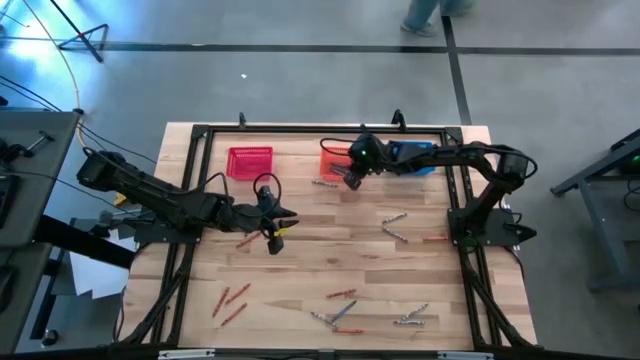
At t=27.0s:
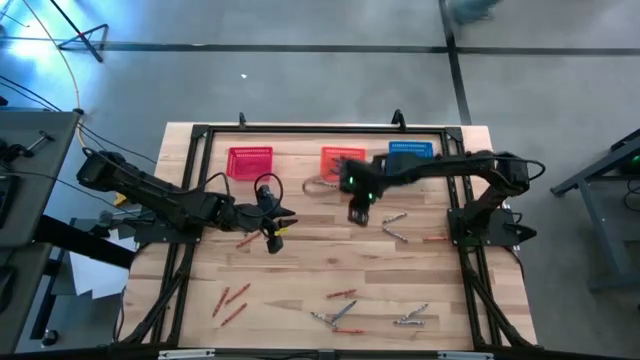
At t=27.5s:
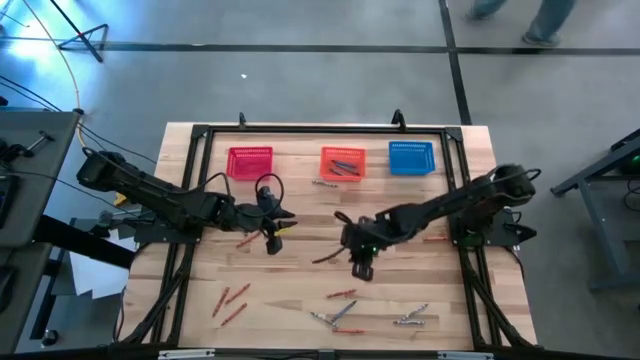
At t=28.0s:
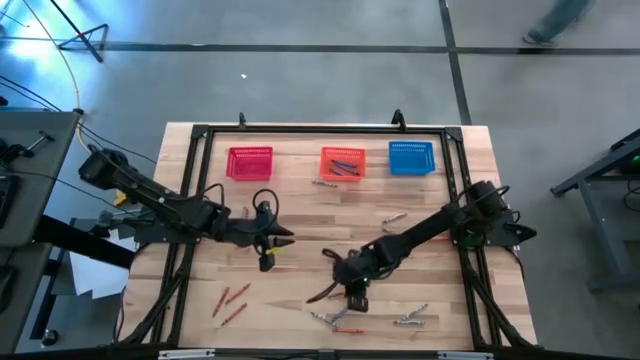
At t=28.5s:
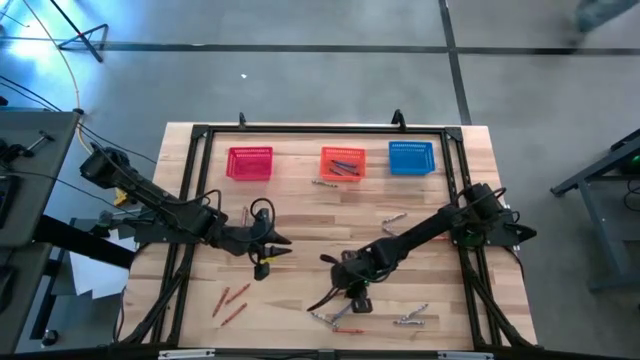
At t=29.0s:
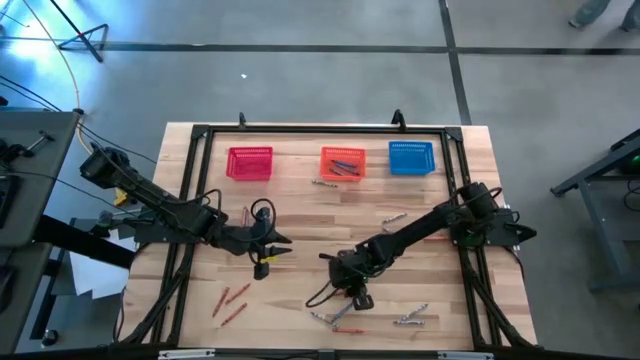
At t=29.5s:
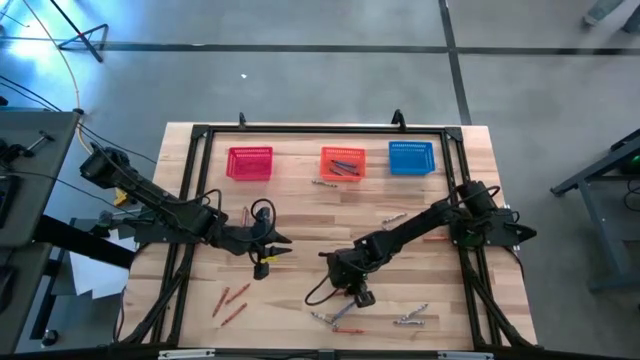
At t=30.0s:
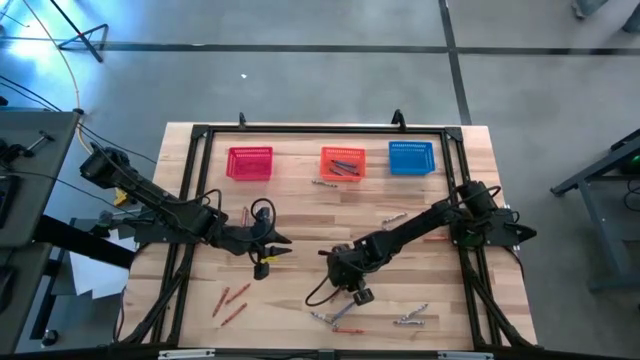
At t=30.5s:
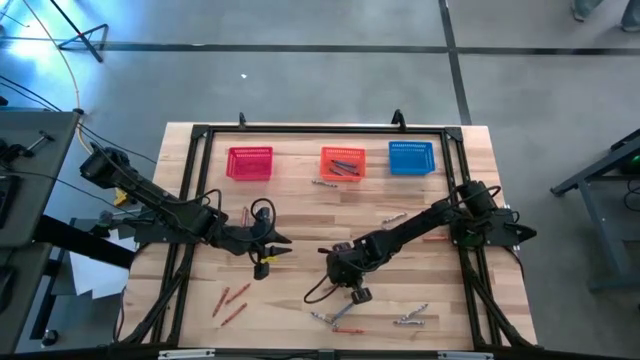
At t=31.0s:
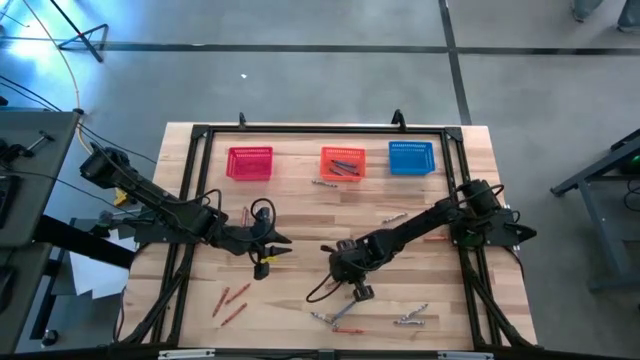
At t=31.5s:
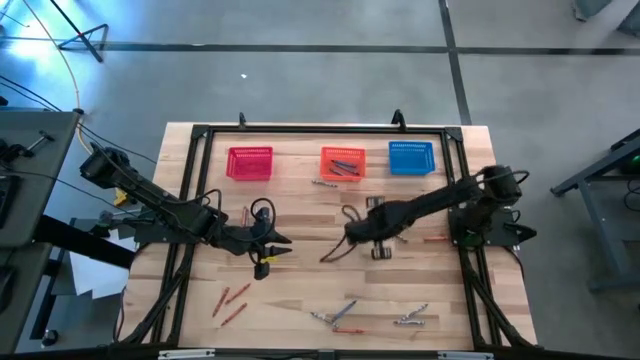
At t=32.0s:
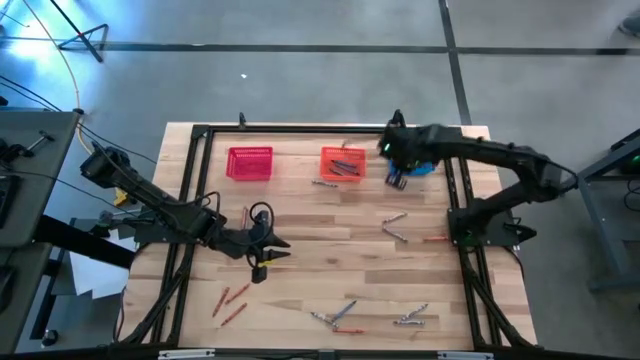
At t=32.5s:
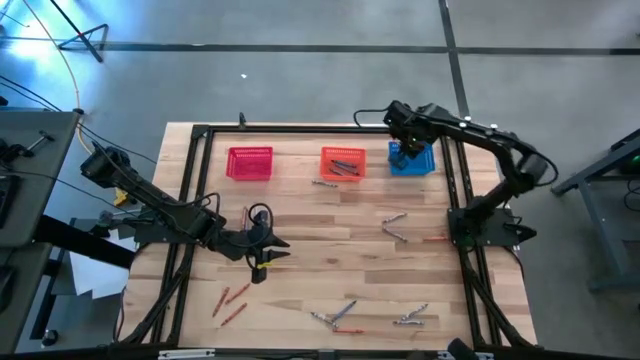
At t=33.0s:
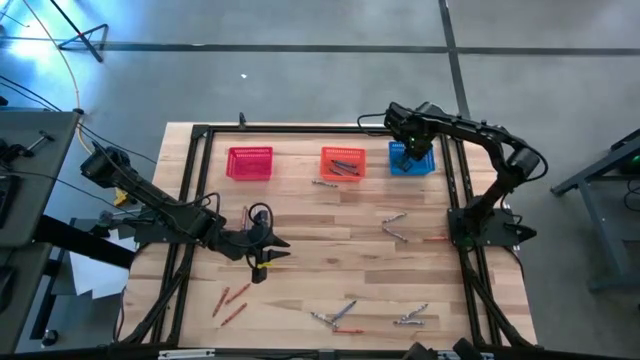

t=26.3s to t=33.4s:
Task: Sort crayons
Put the orange crayon into the blue bin

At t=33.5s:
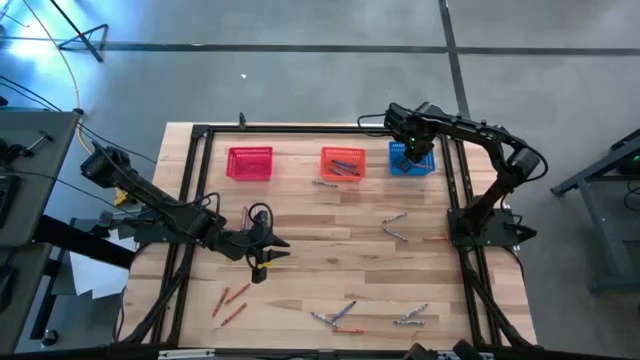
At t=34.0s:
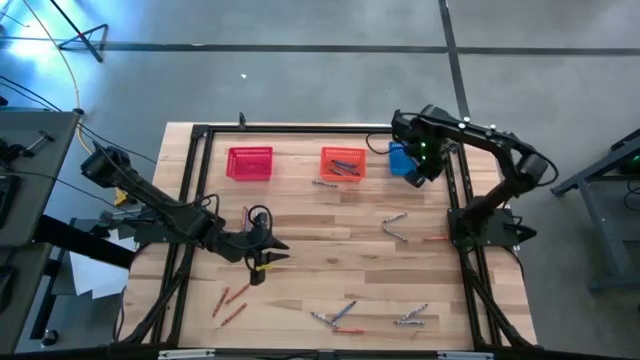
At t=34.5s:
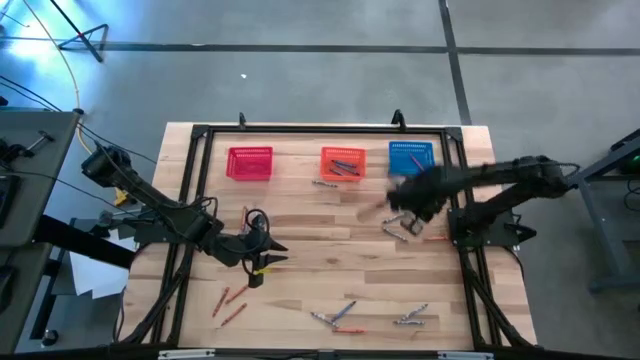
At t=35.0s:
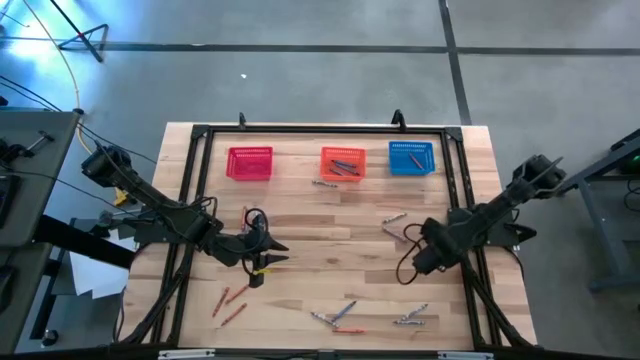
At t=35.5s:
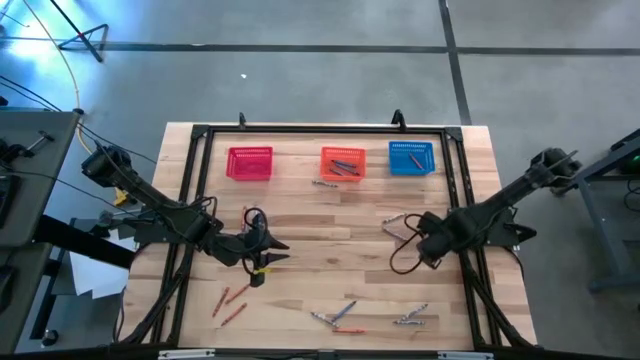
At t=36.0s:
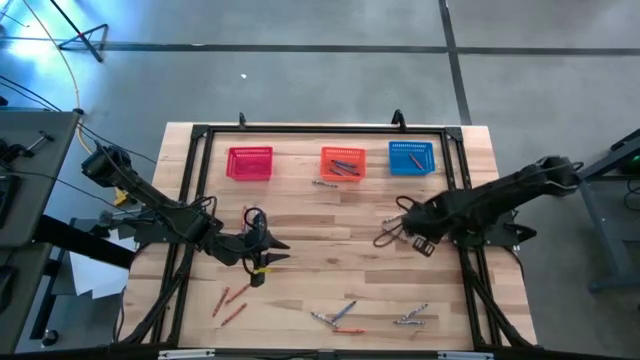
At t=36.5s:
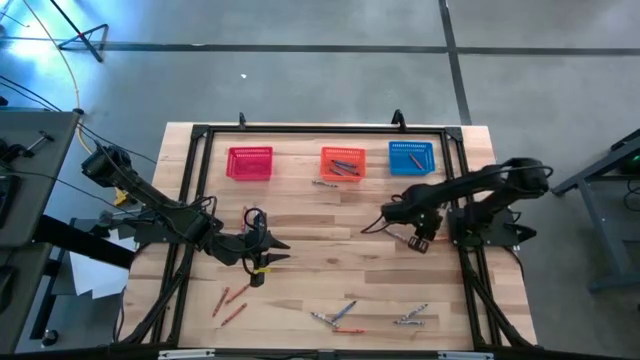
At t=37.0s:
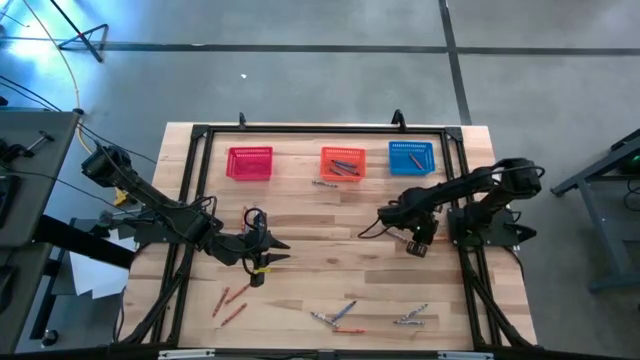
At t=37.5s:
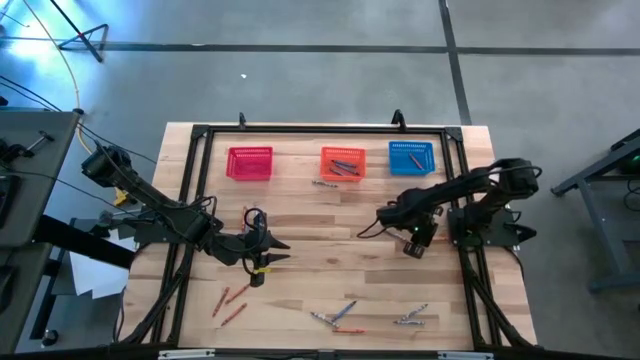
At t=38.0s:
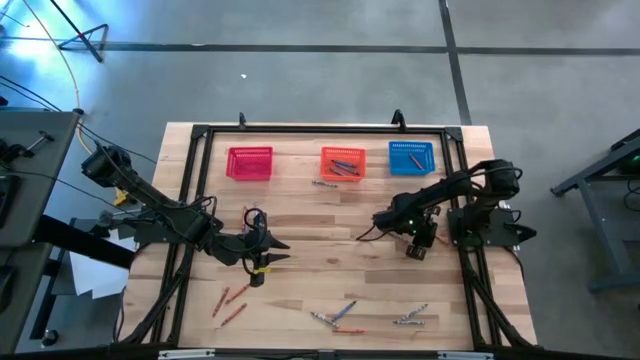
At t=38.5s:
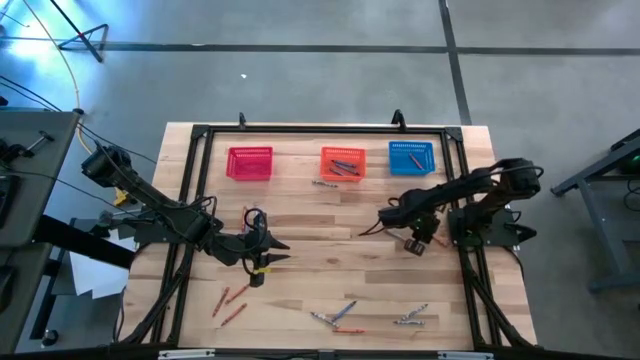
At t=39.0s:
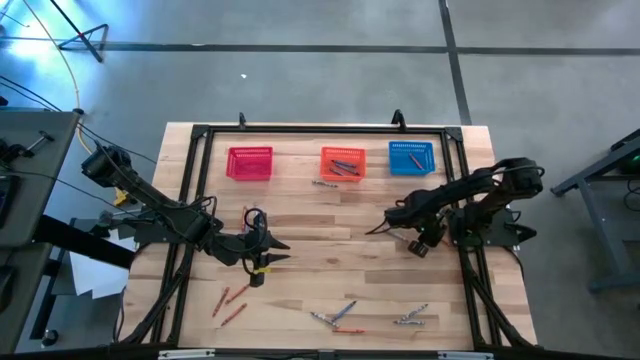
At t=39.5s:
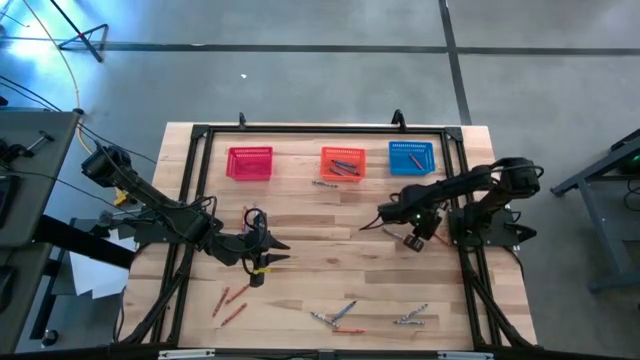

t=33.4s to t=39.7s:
Put the orange crayon into the blue bin

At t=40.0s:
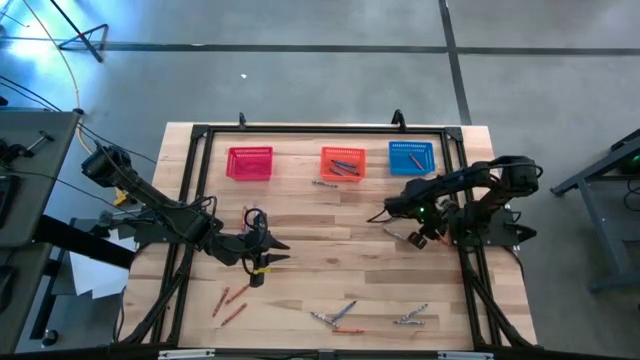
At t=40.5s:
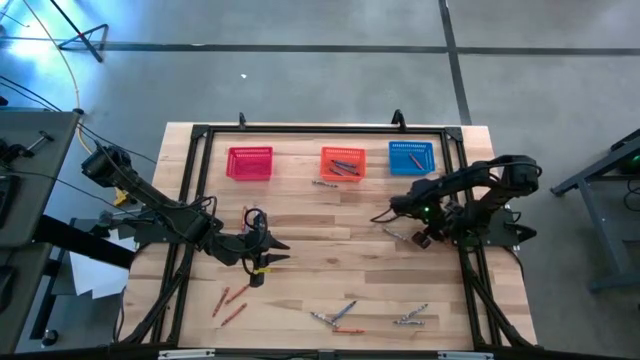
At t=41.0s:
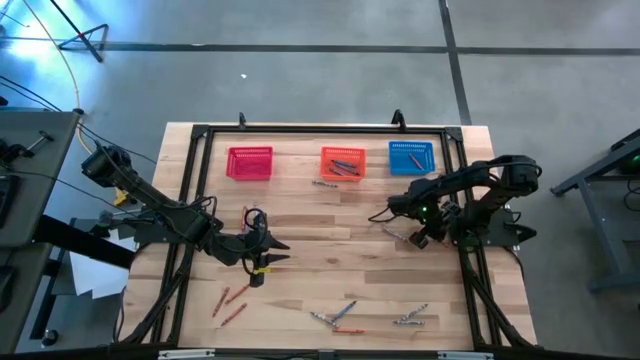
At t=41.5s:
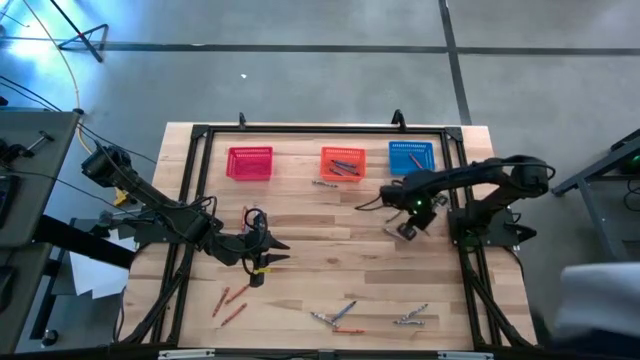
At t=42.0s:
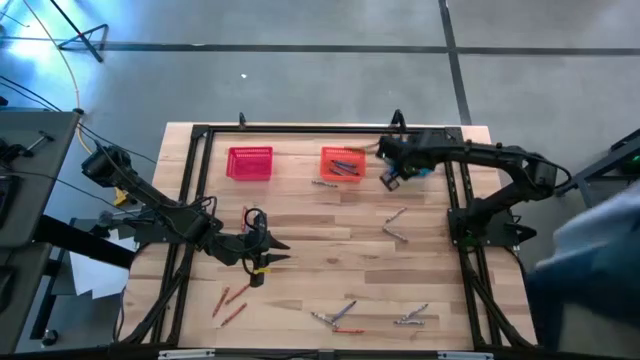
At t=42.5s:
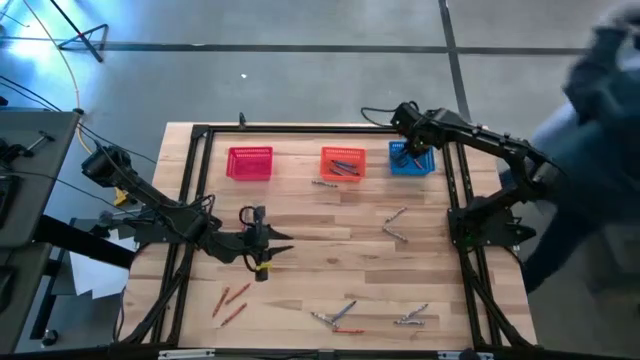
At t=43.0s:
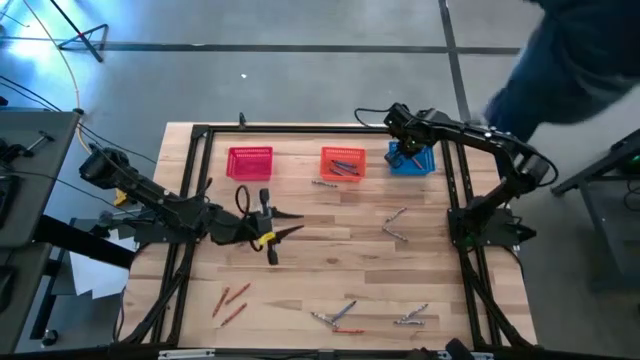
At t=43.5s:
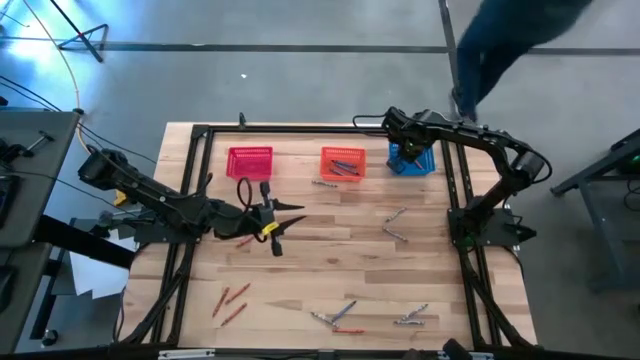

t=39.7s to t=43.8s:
Put the orange crayon into the blue bin

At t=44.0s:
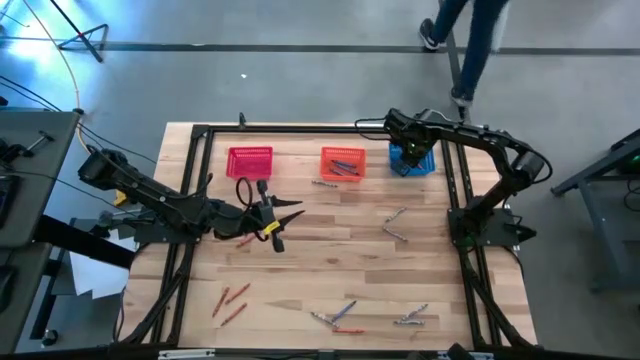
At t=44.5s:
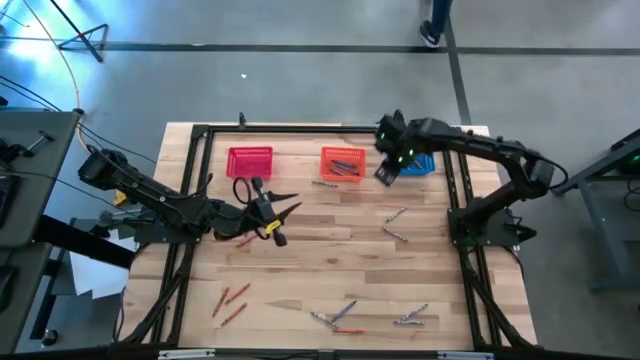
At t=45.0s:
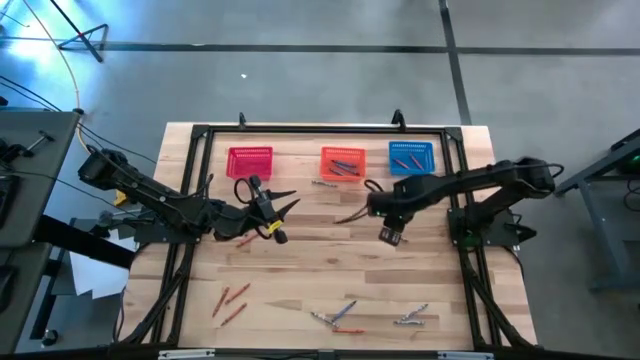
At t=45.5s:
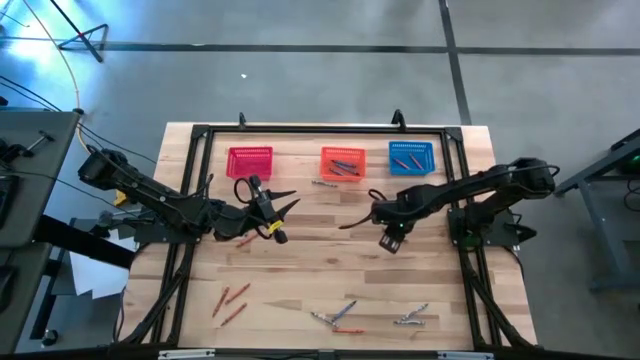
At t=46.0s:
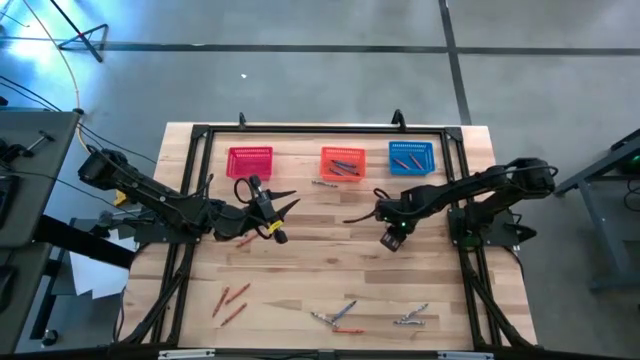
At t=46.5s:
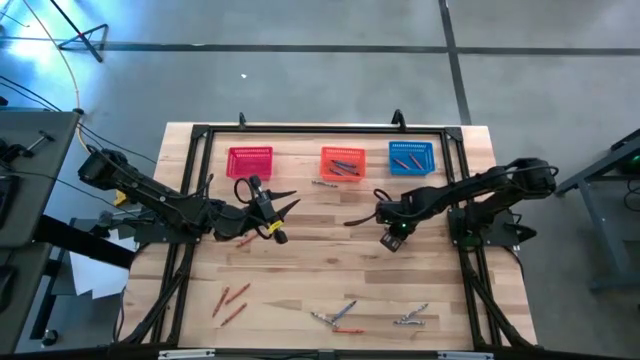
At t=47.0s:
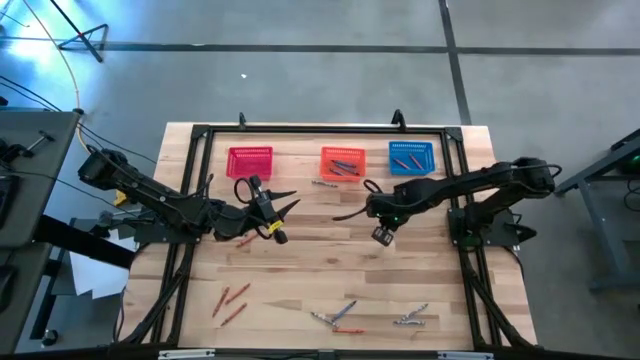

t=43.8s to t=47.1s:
Put the gray crayon into the red bin
